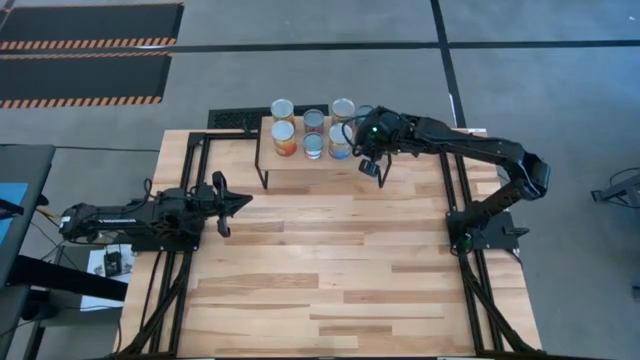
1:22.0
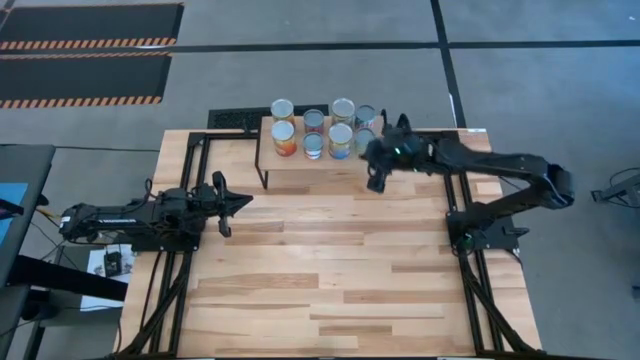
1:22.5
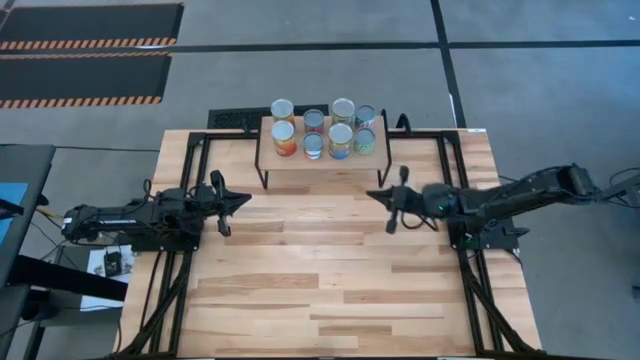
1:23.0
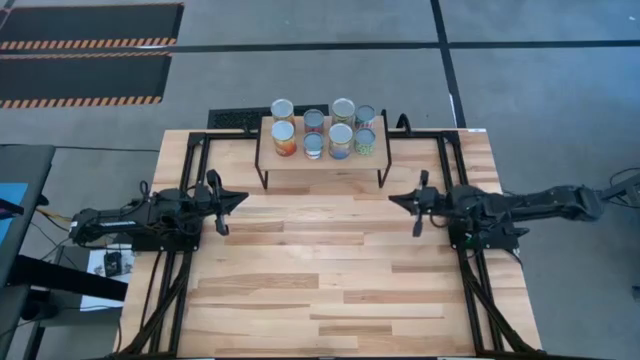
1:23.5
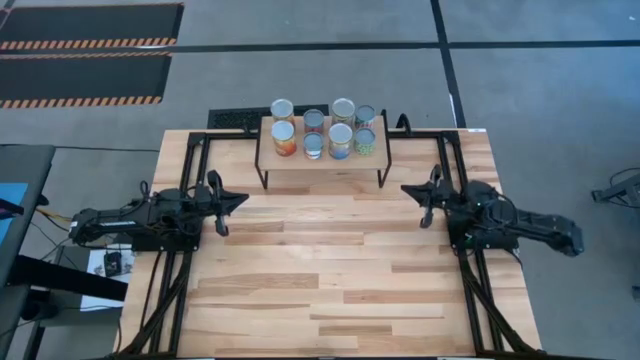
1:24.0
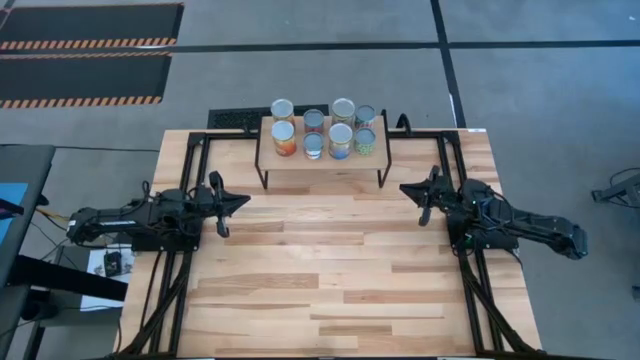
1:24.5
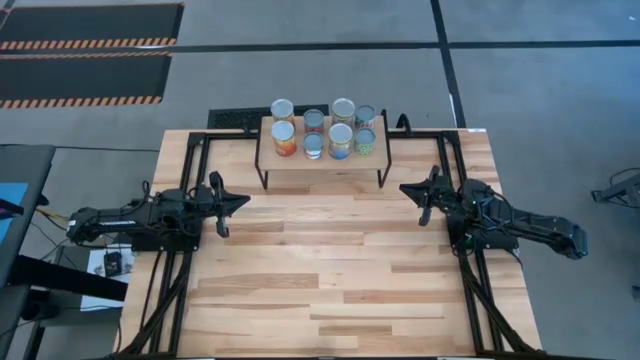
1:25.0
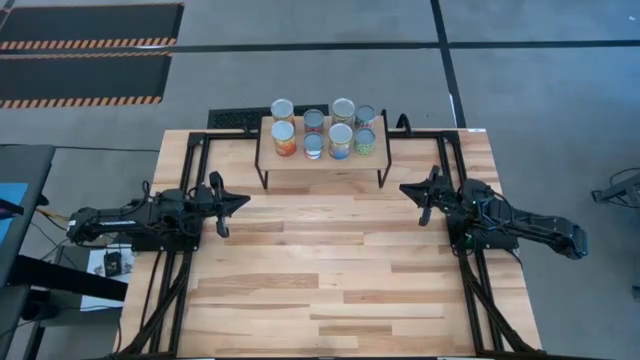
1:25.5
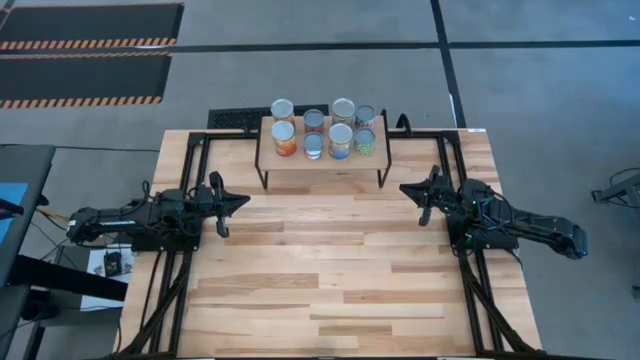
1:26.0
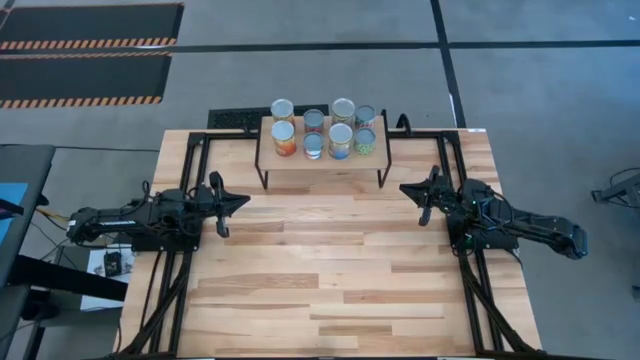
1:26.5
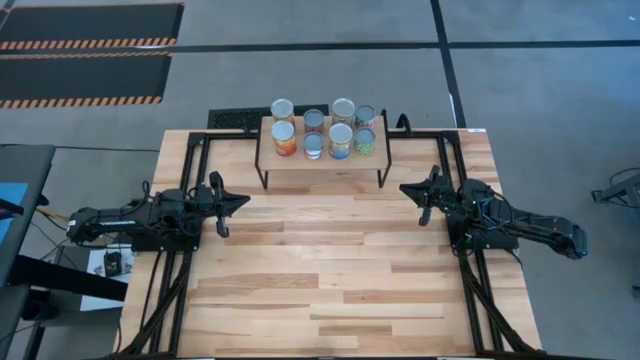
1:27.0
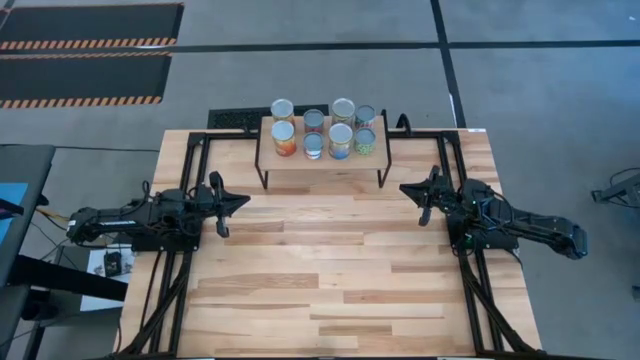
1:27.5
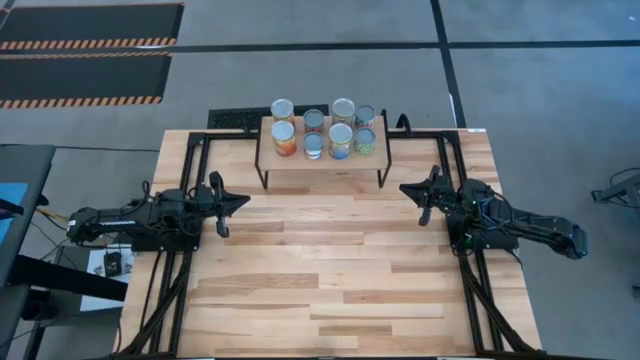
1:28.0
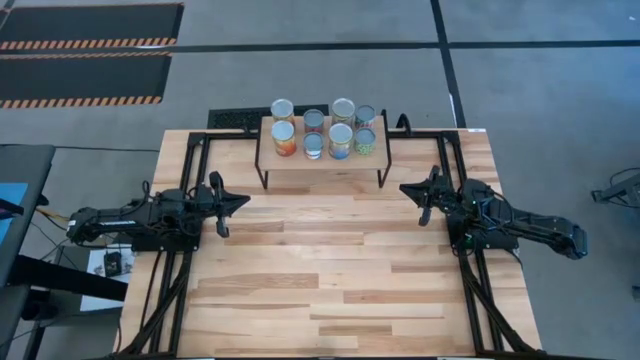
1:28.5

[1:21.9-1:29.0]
Task: Pick and place cans onto a shelf
Return to Home Position

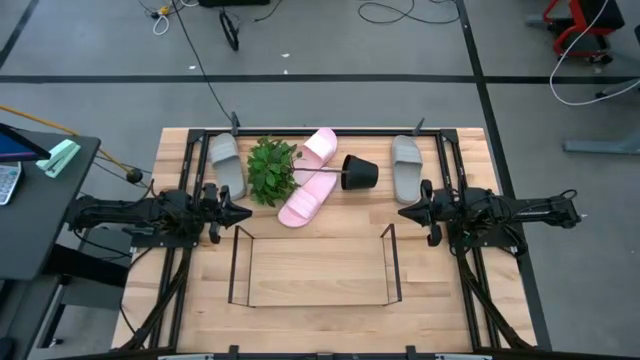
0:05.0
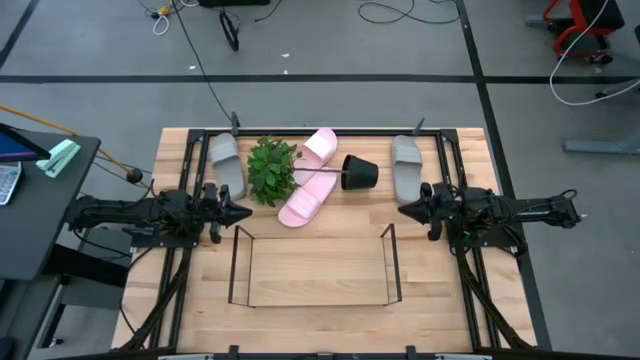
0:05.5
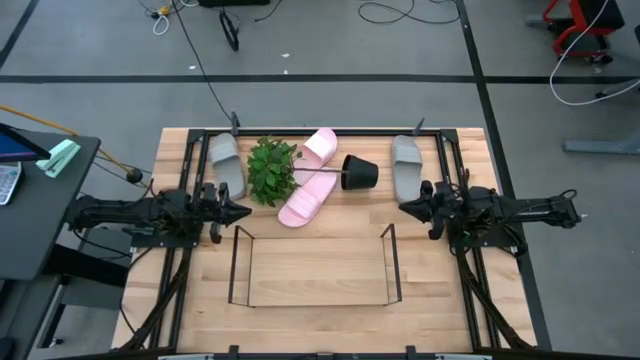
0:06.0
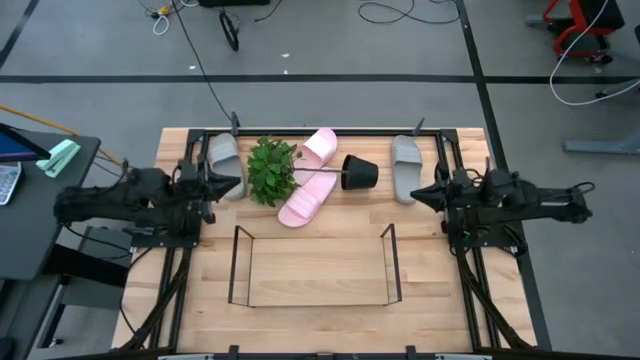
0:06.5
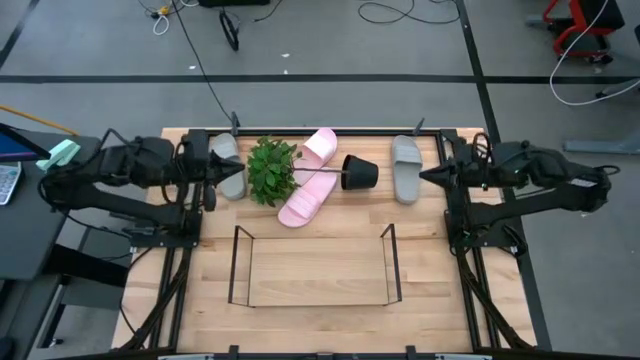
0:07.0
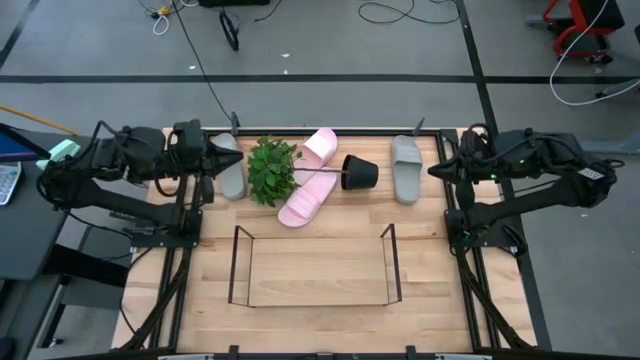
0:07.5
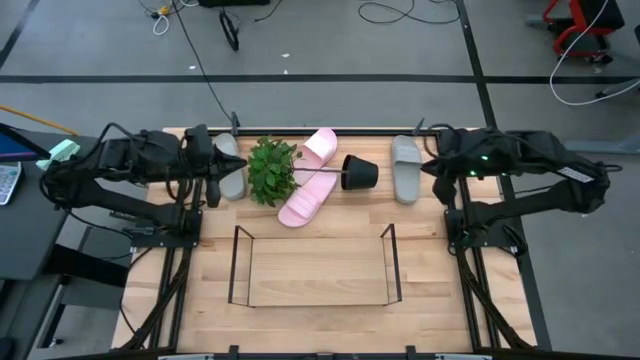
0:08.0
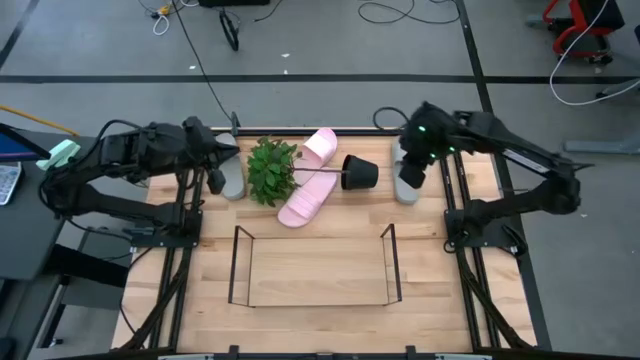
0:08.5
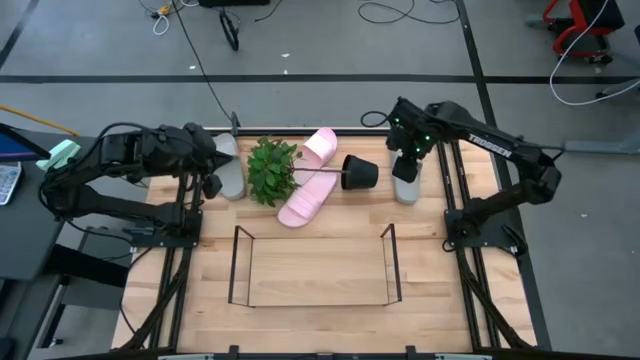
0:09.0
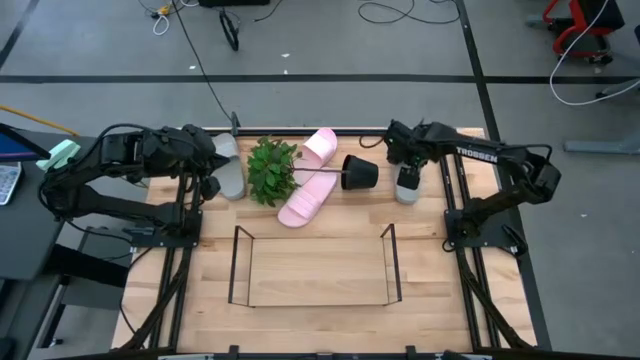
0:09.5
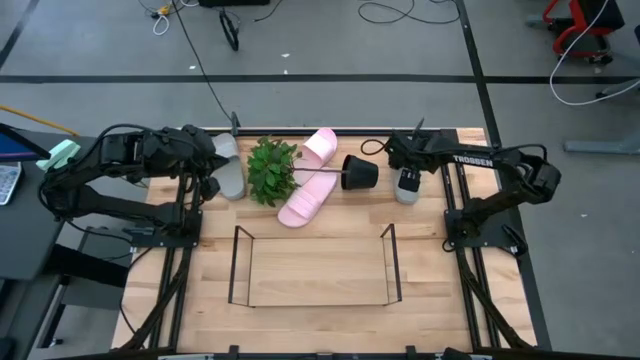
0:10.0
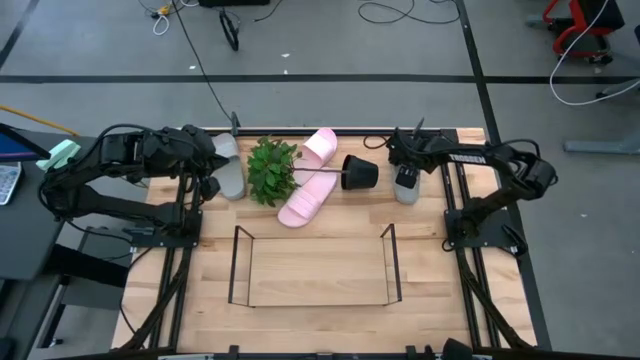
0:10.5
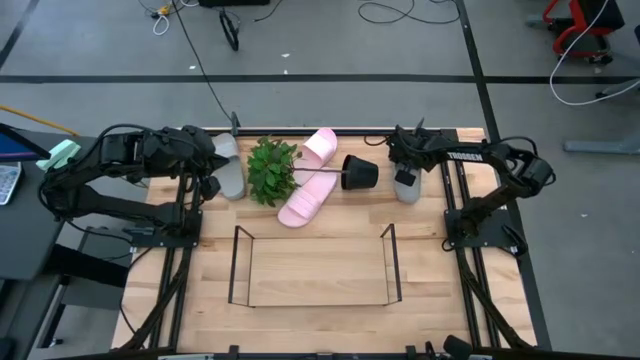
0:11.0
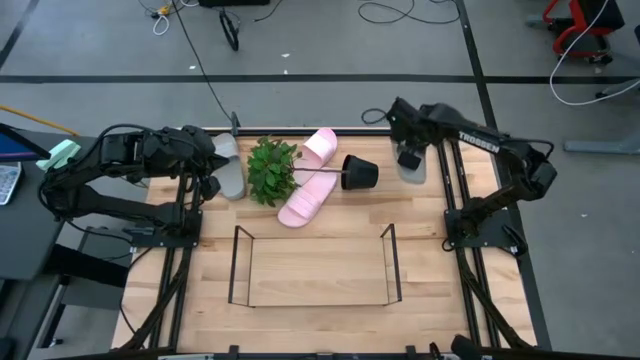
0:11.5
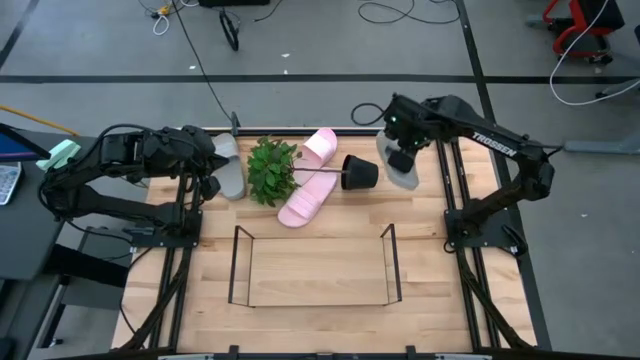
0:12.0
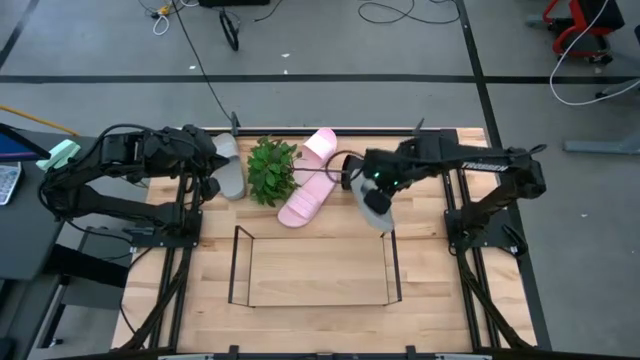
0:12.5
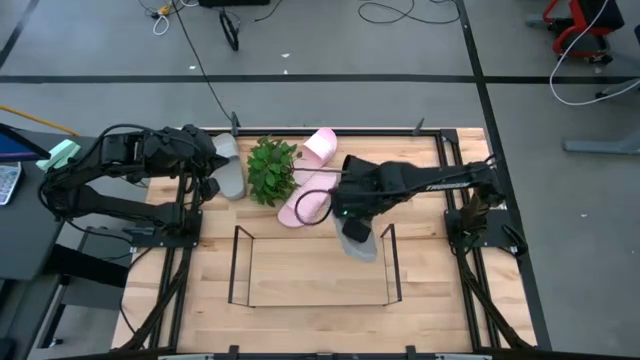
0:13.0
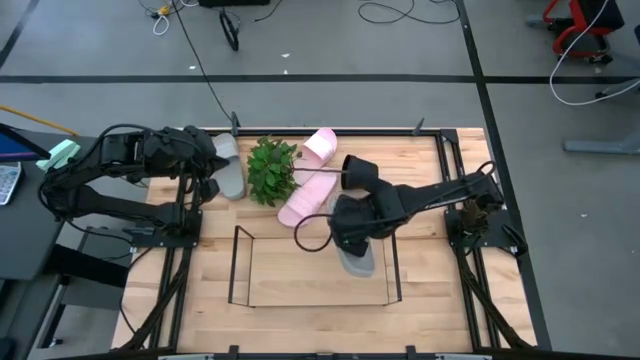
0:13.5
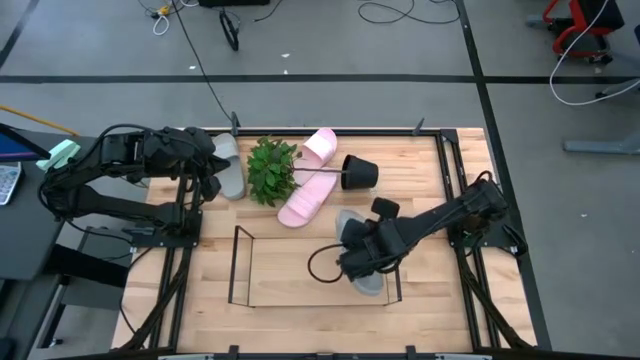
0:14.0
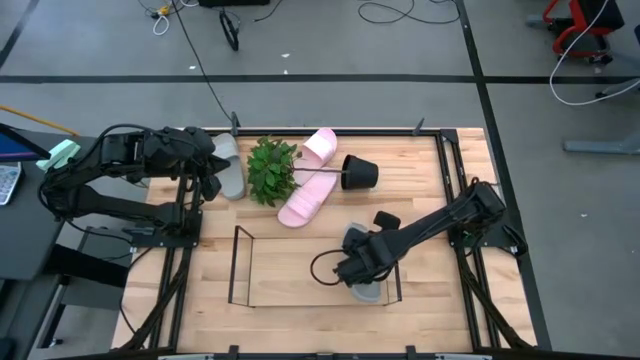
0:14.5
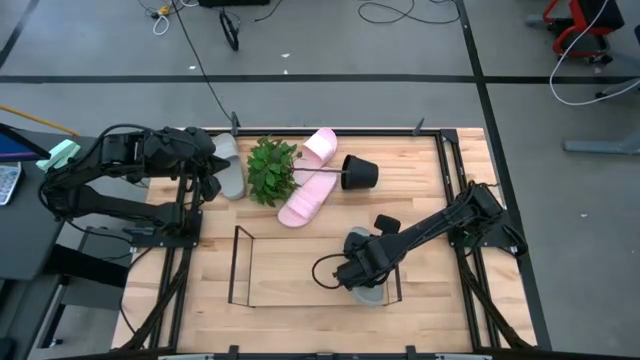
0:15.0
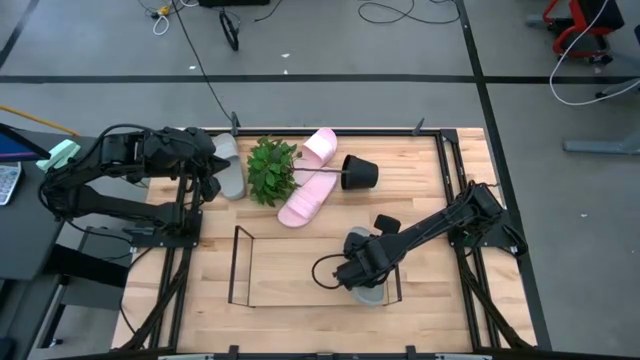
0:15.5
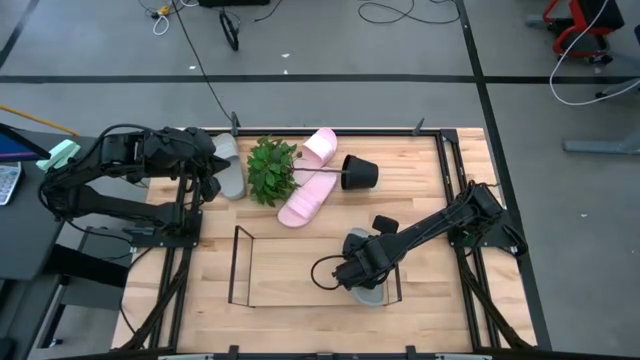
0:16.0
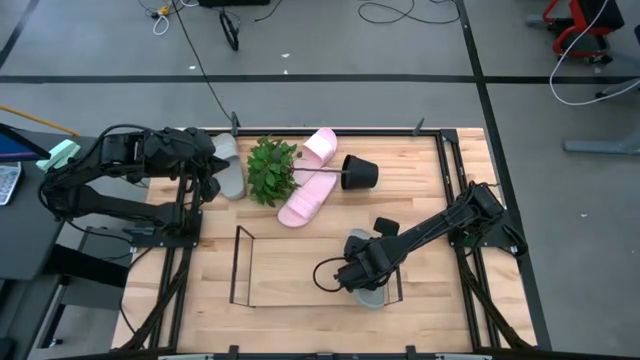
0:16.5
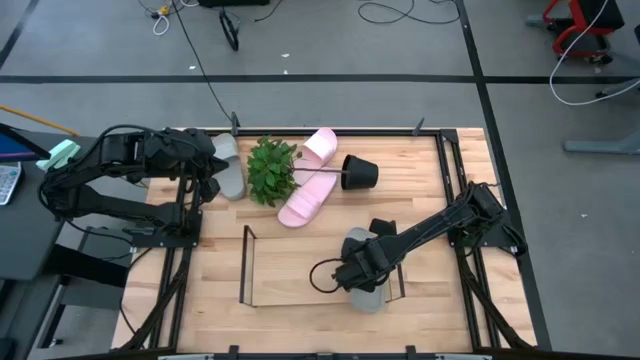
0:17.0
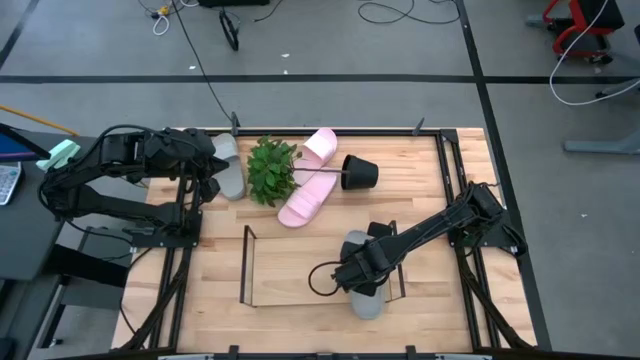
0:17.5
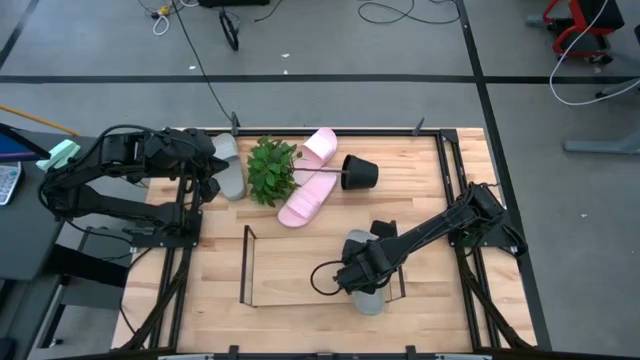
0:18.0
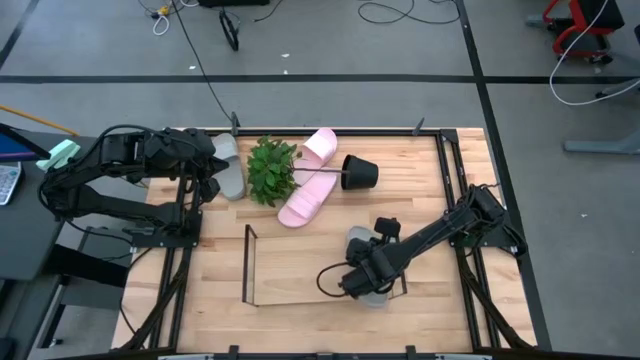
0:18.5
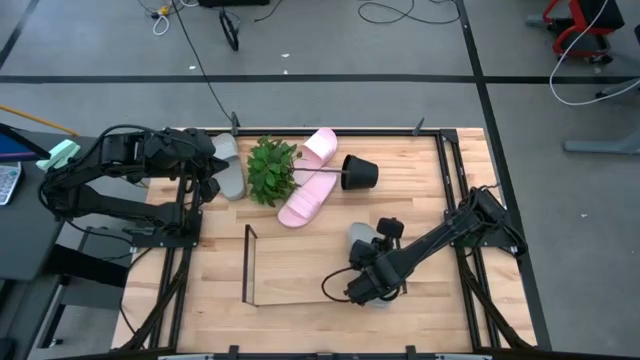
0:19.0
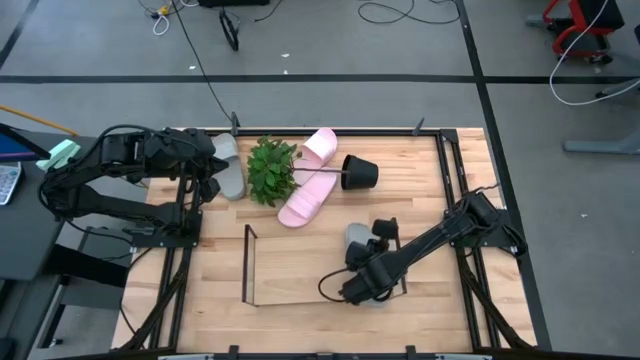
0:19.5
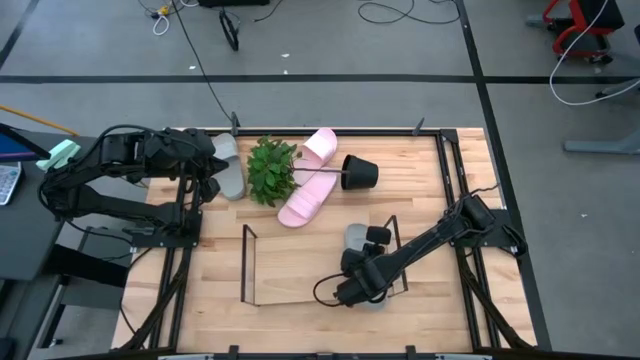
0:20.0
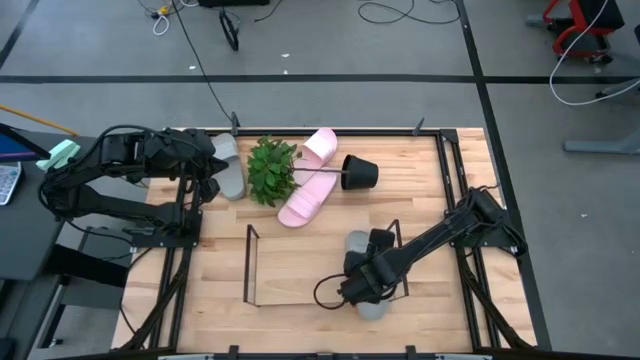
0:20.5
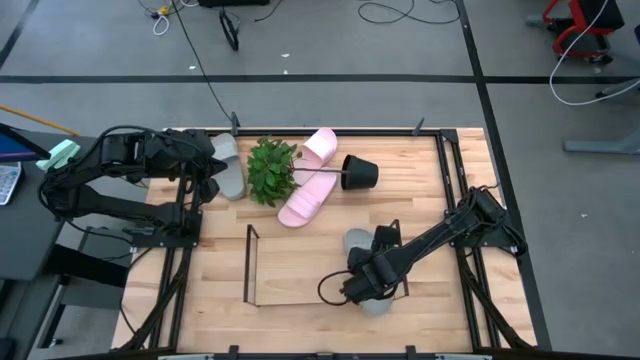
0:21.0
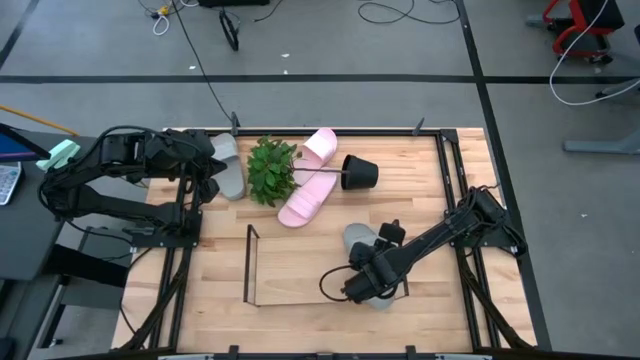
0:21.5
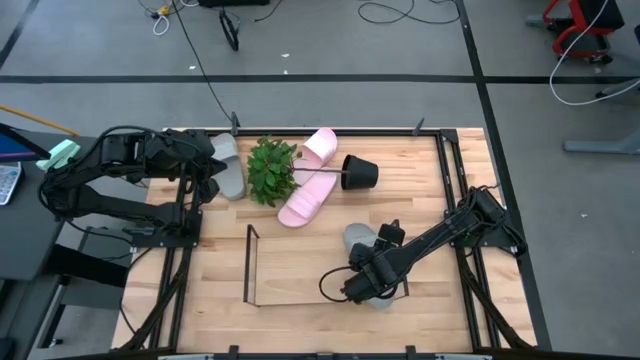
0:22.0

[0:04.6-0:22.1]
Task: Pick and place slides into the shelf
Put the right gray slipper on the shelf
